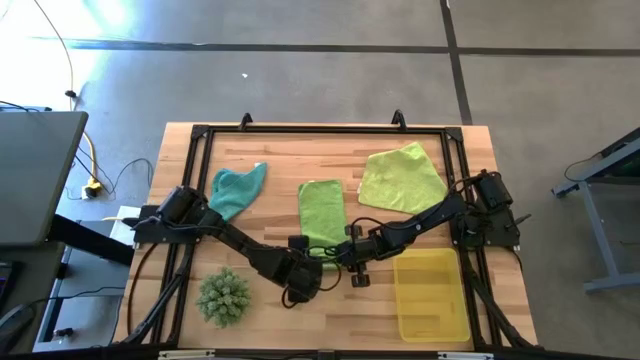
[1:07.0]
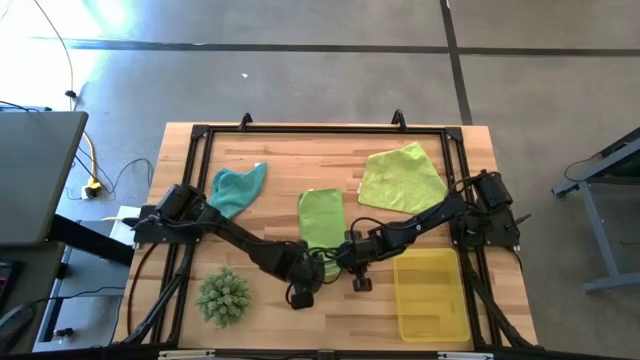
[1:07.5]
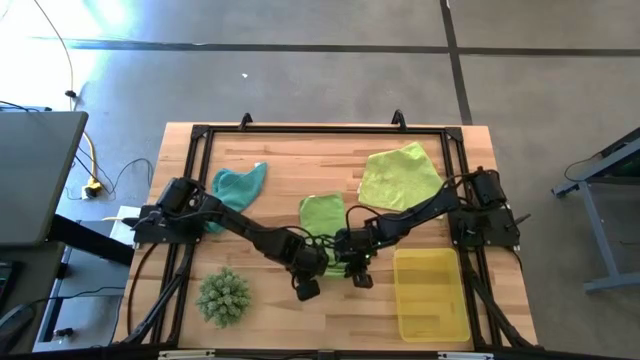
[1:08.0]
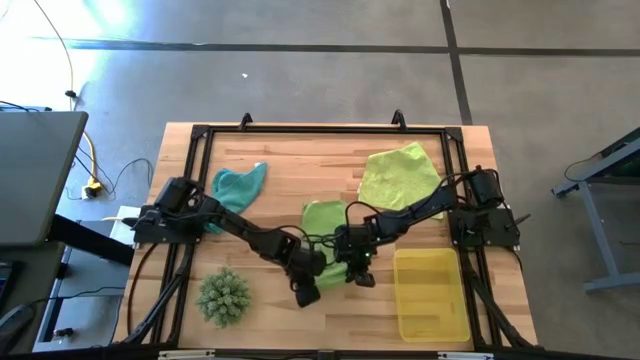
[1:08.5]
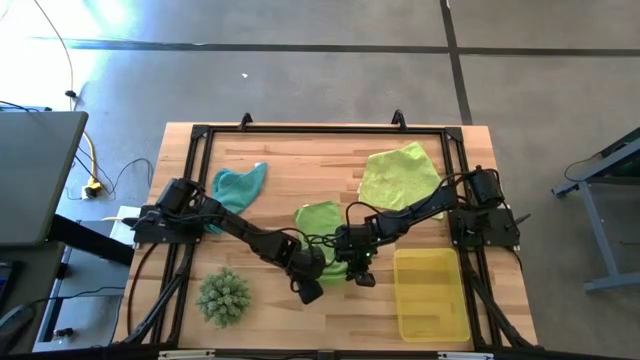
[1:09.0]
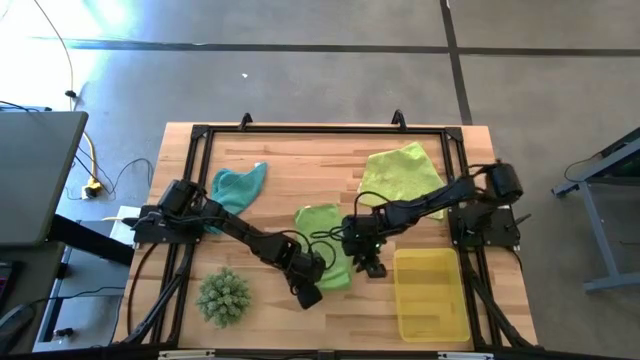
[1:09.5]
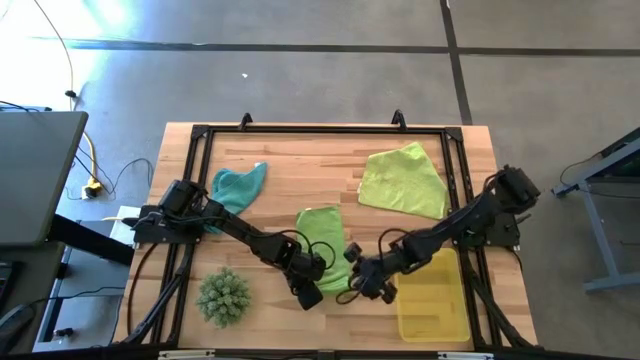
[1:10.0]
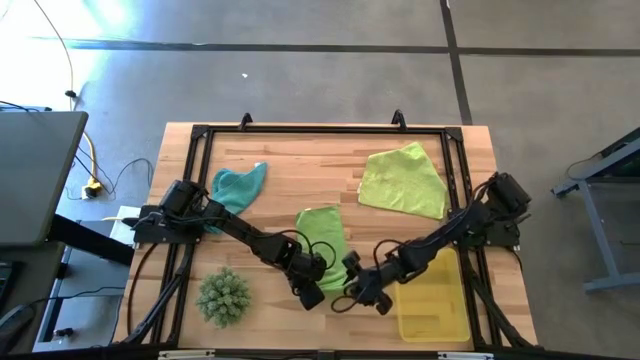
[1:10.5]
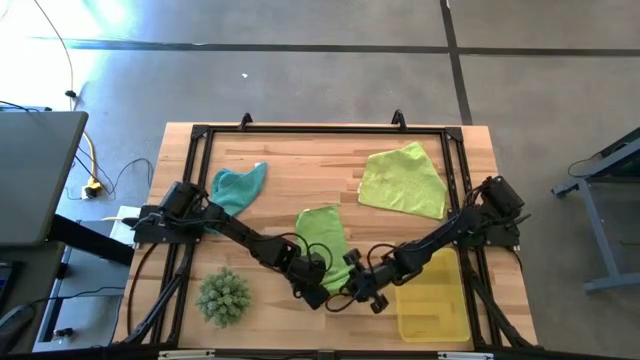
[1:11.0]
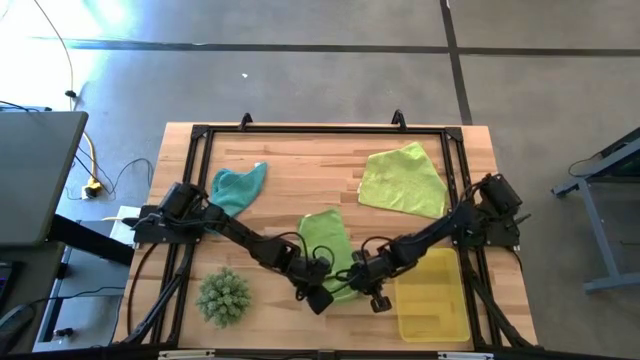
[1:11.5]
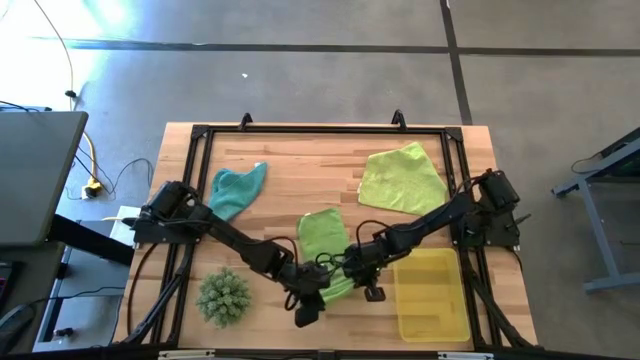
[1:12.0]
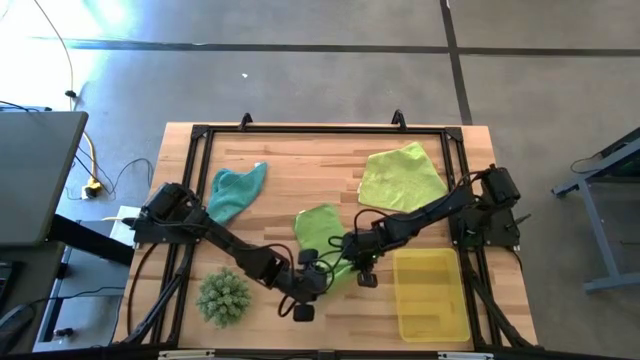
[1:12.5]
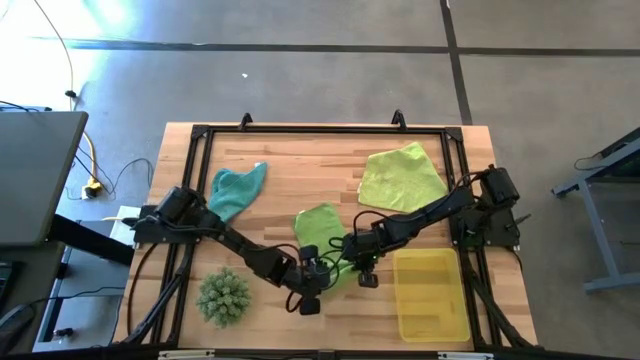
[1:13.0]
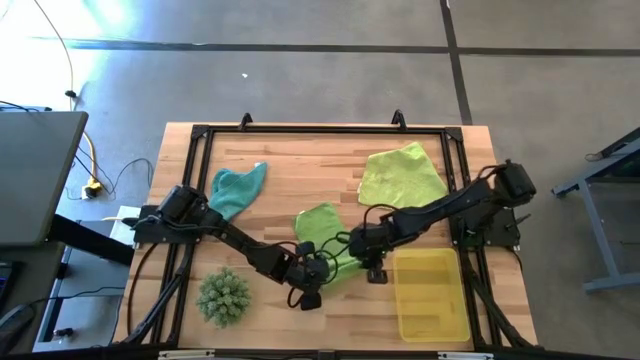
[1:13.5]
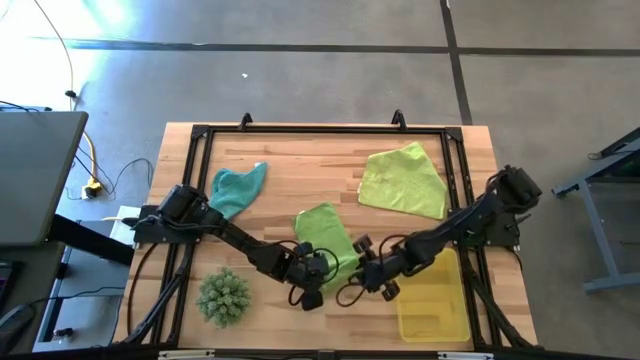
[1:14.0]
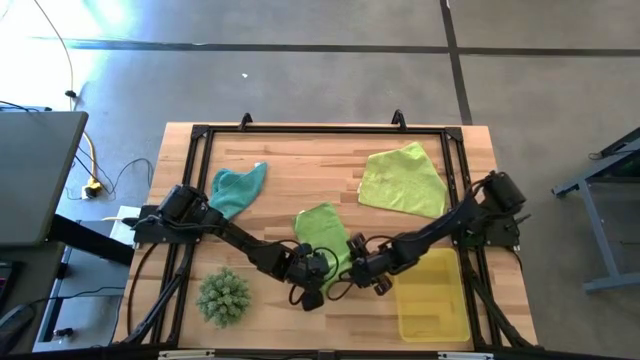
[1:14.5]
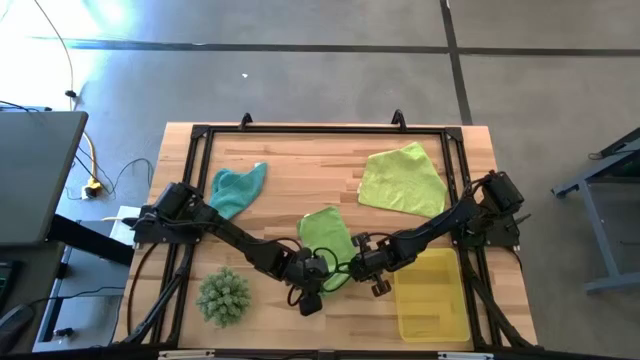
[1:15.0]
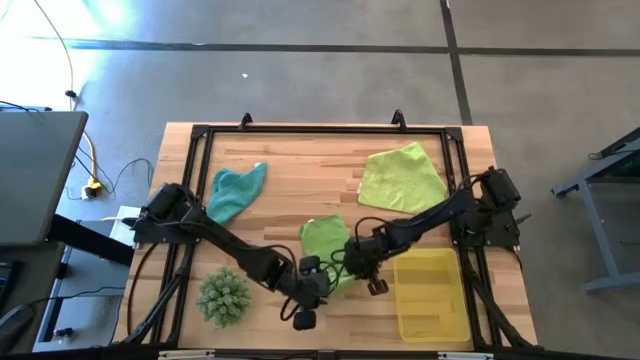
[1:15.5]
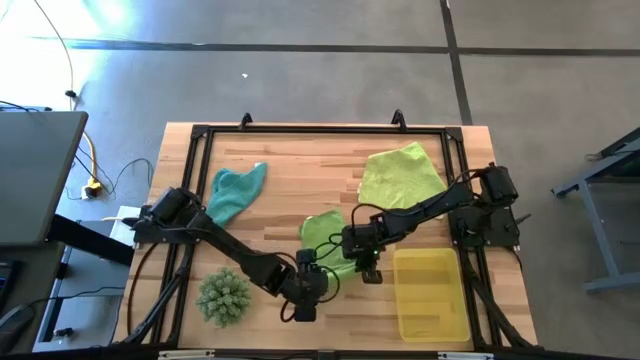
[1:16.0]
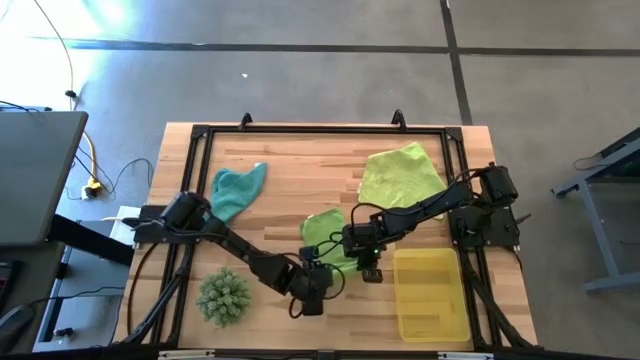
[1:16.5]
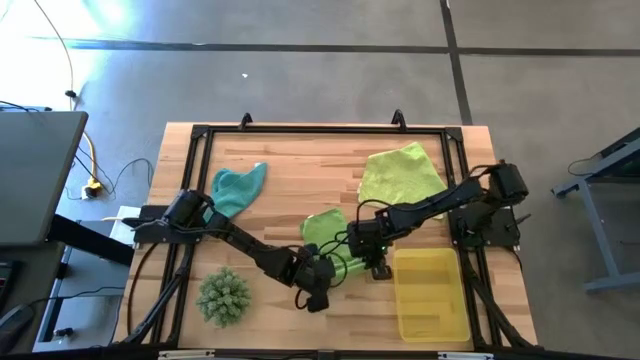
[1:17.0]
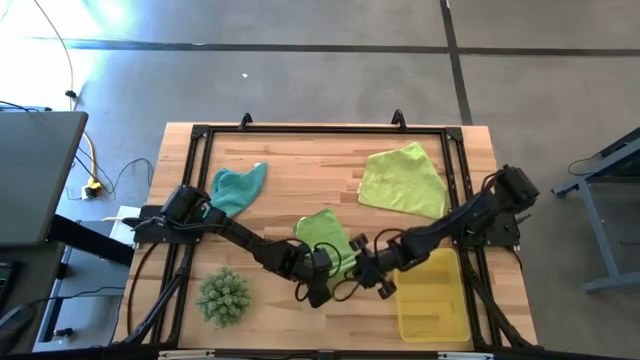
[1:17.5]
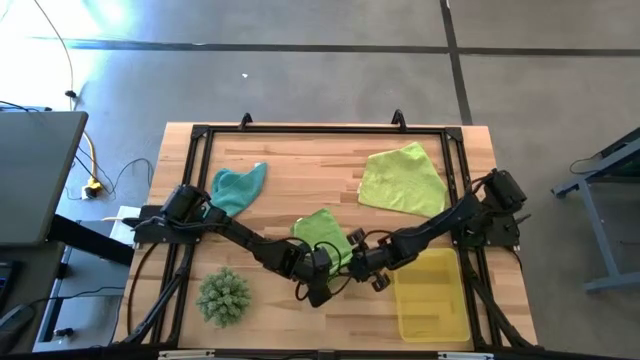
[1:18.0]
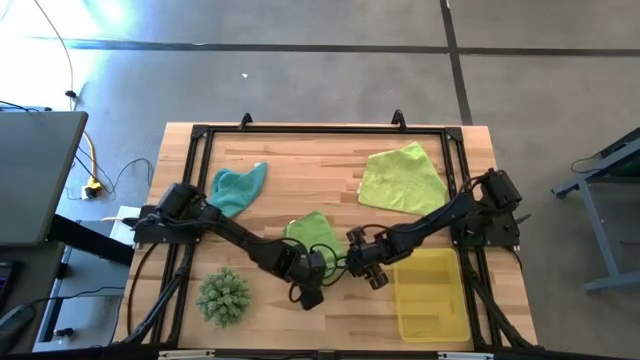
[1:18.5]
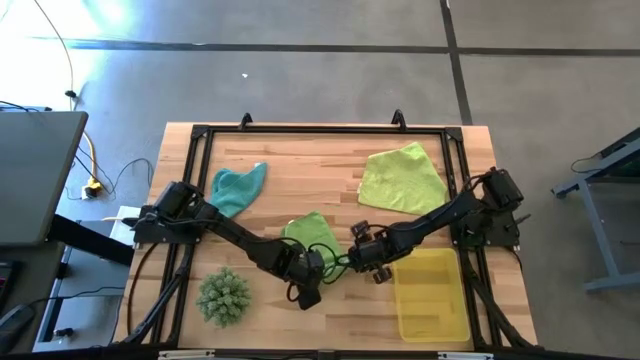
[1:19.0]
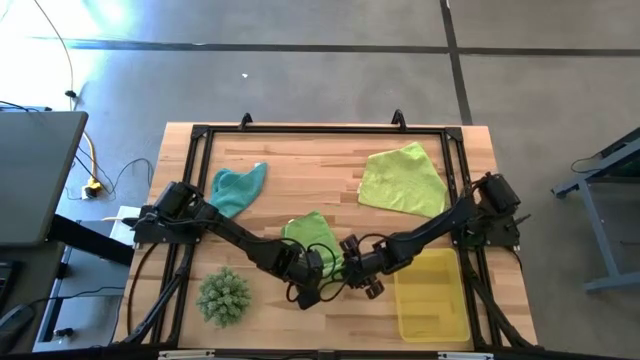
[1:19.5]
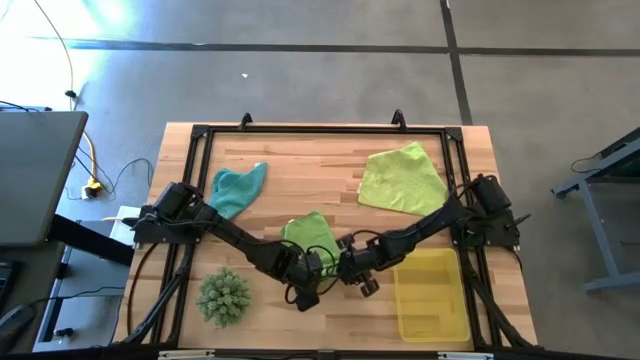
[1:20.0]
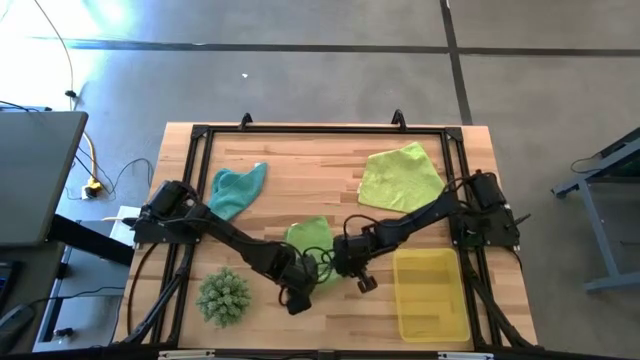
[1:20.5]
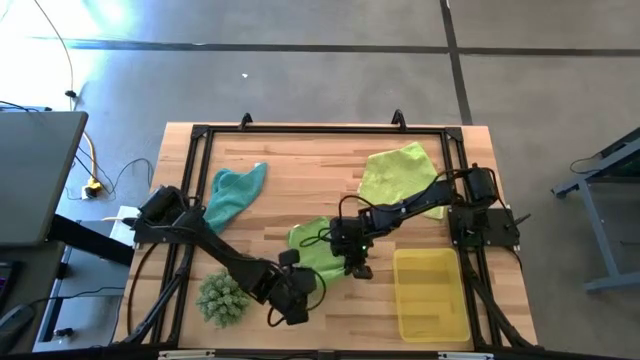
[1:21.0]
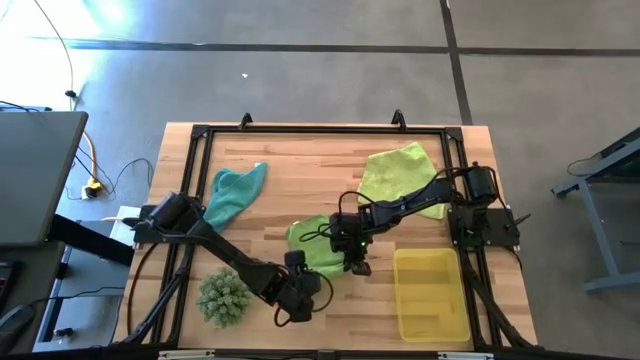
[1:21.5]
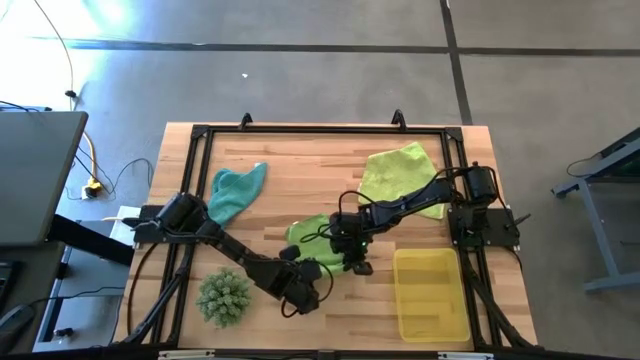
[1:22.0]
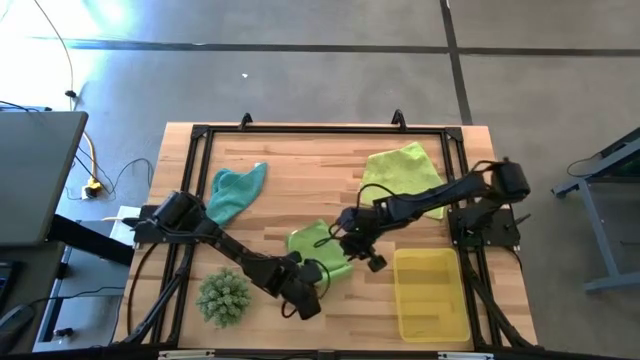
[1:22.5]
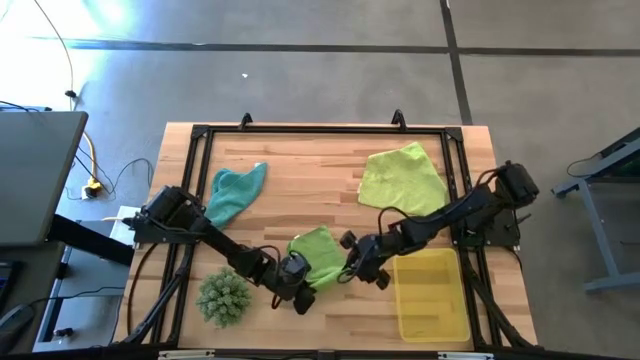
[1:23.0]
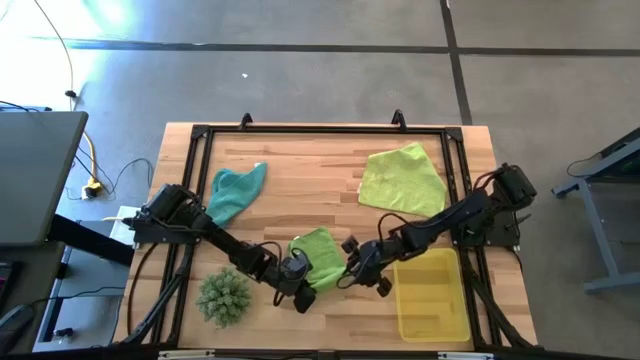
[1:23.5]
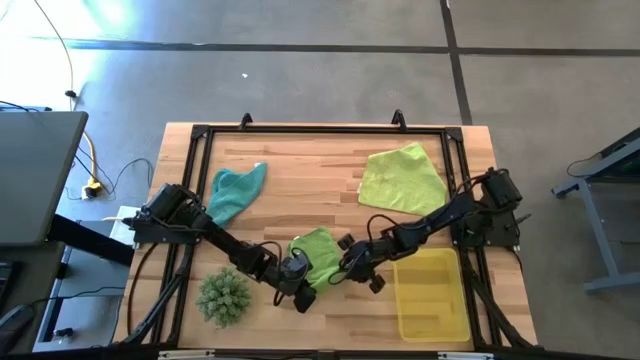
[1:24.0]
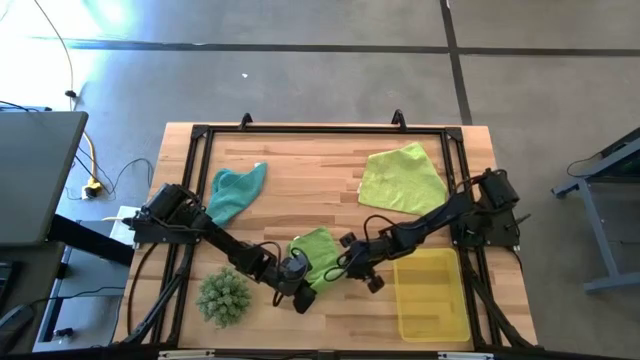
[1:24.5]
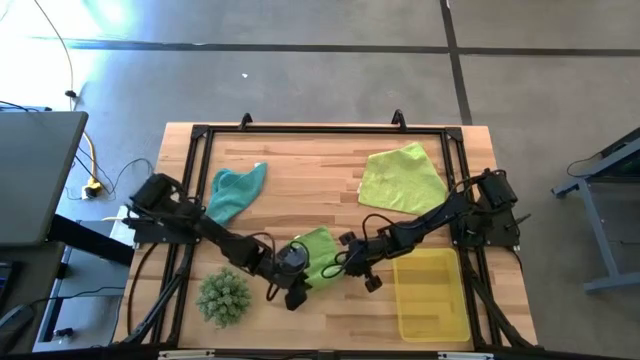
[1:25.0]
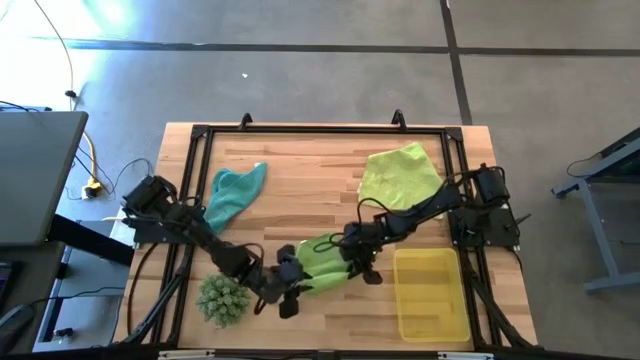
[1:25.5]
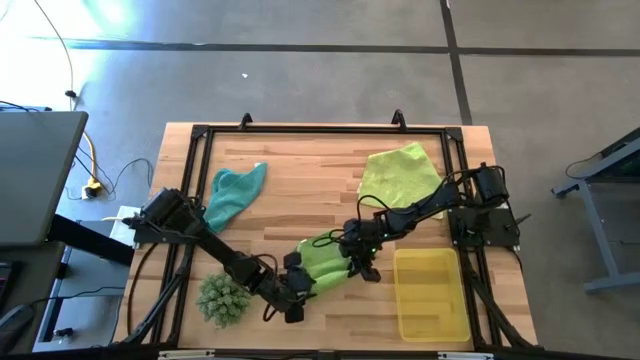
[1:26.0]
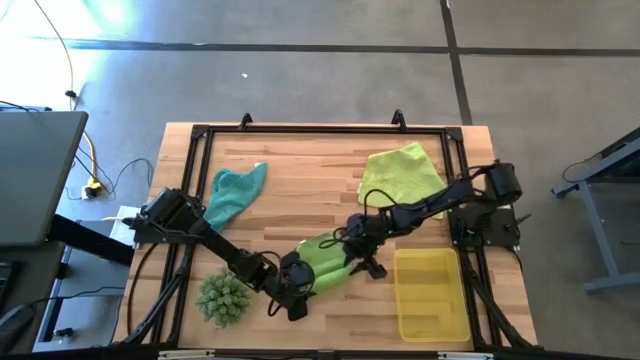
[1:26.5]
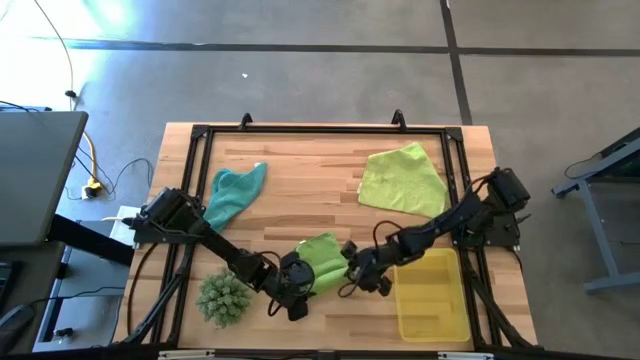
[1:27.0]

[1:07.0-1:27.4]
Task: Roll microfiber towels into tight, uniform cylinder then place into a basket
Roll the green microfiber cloth
